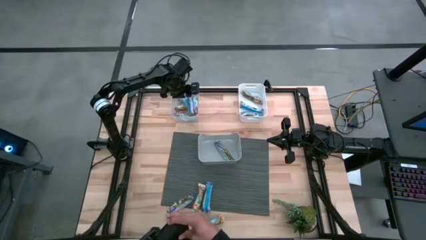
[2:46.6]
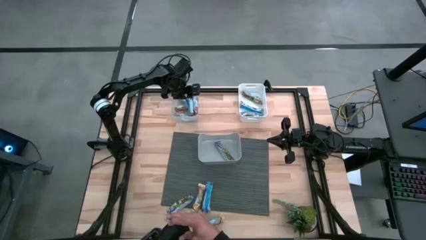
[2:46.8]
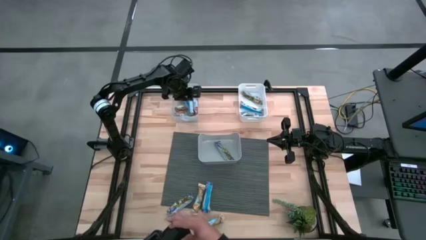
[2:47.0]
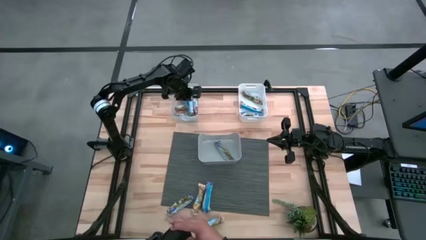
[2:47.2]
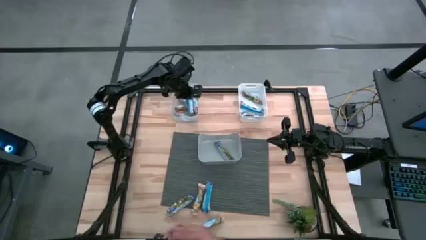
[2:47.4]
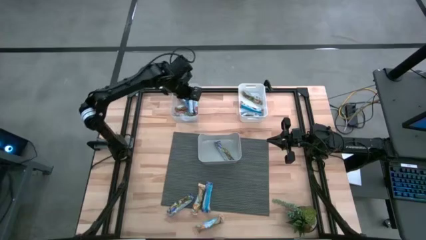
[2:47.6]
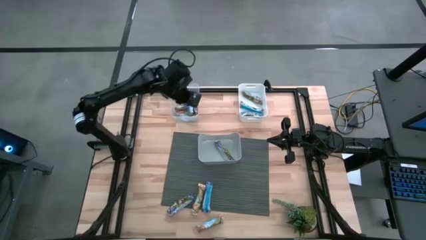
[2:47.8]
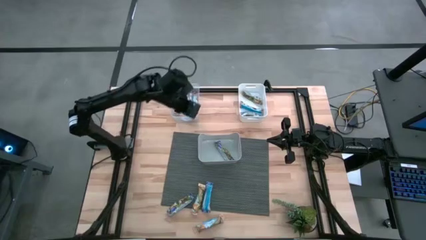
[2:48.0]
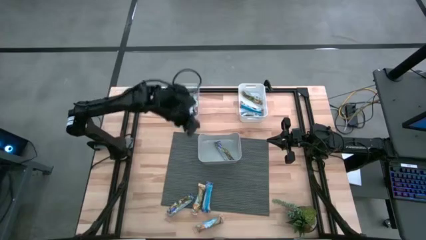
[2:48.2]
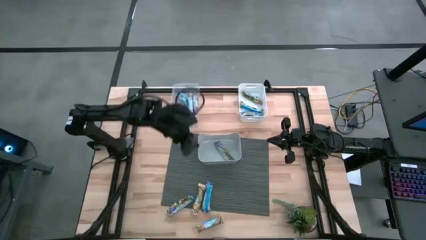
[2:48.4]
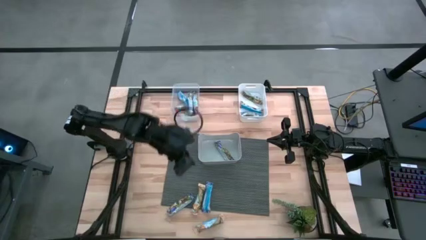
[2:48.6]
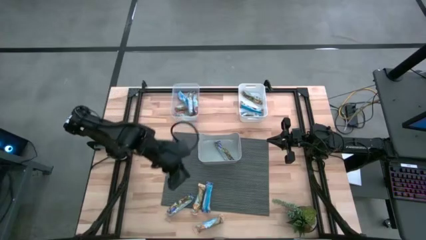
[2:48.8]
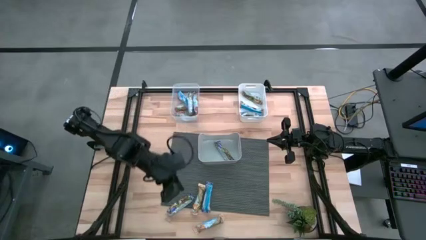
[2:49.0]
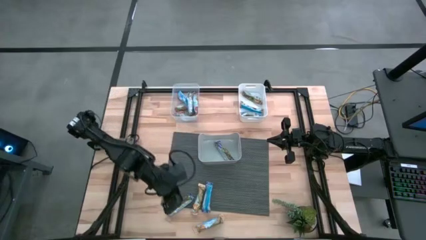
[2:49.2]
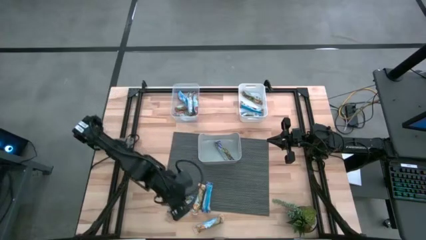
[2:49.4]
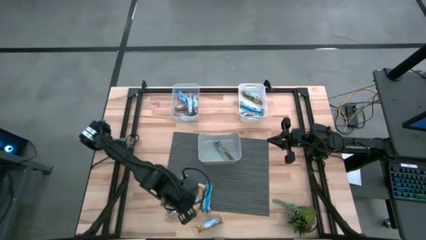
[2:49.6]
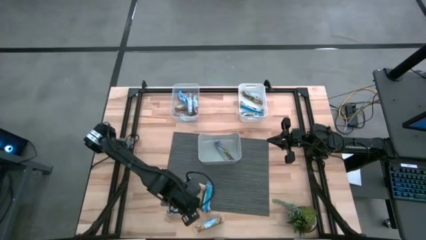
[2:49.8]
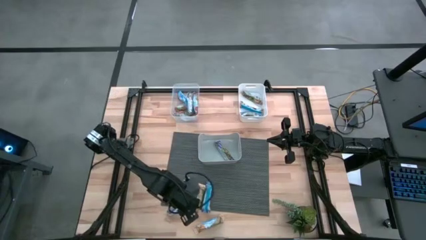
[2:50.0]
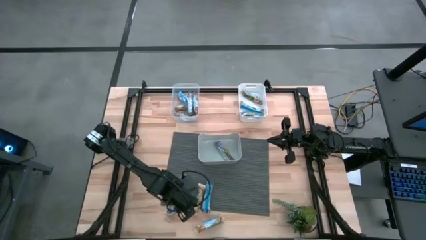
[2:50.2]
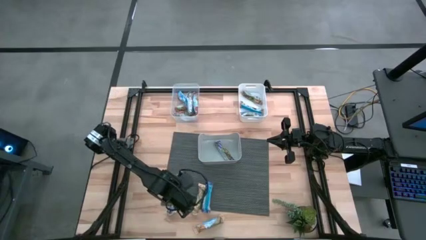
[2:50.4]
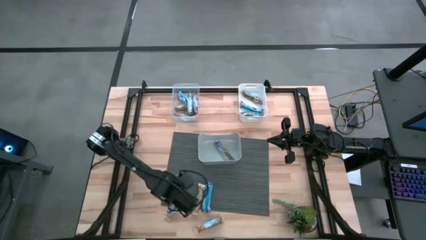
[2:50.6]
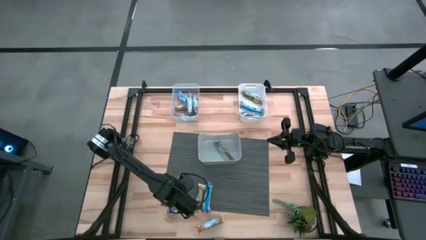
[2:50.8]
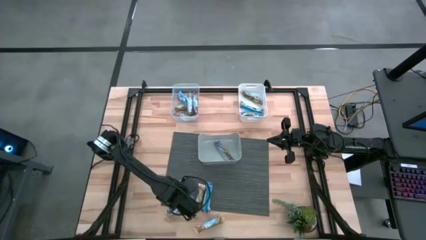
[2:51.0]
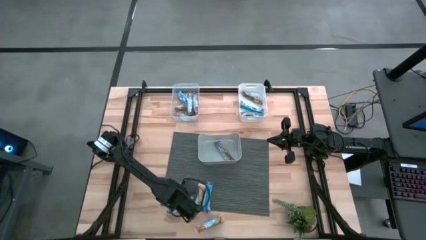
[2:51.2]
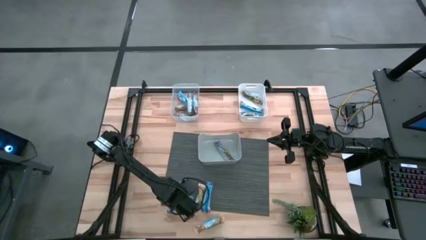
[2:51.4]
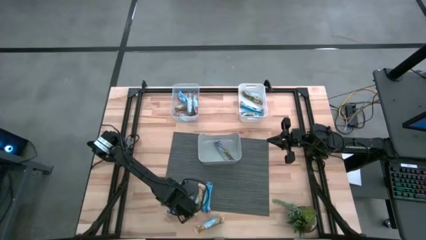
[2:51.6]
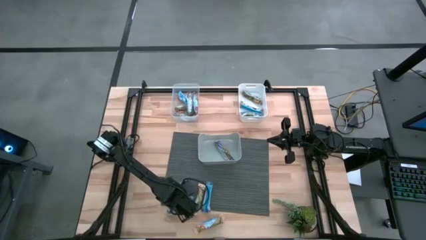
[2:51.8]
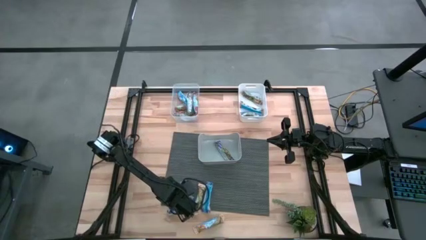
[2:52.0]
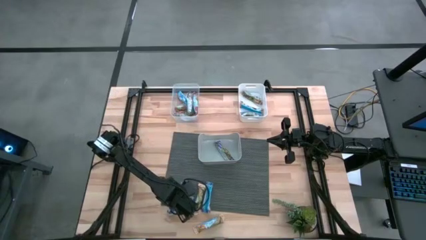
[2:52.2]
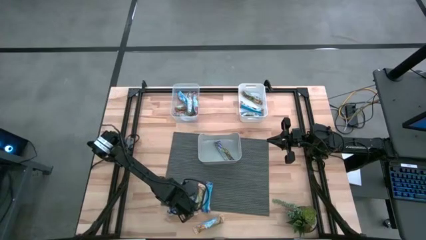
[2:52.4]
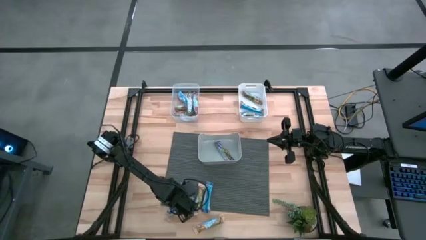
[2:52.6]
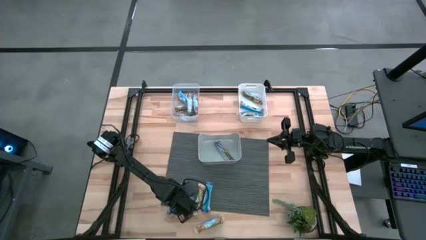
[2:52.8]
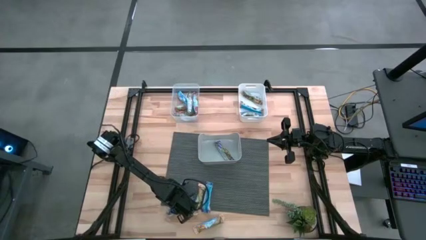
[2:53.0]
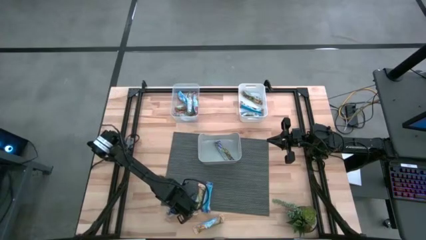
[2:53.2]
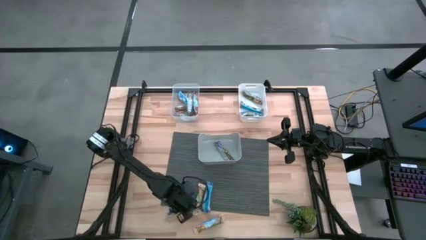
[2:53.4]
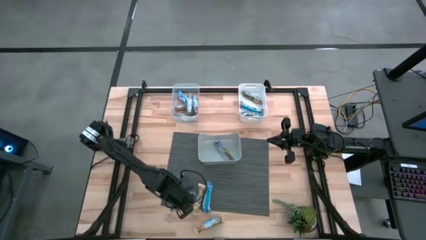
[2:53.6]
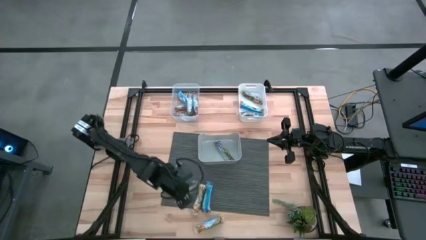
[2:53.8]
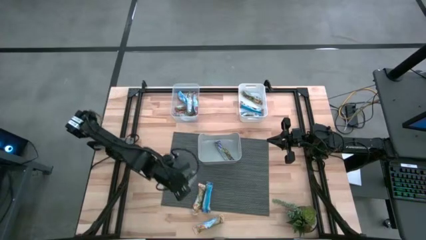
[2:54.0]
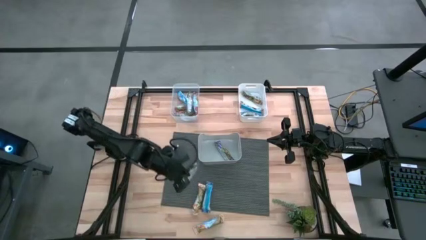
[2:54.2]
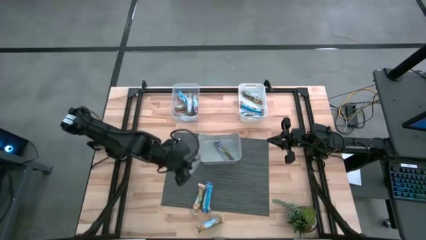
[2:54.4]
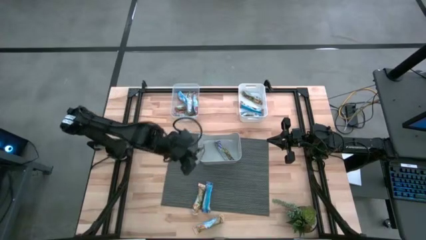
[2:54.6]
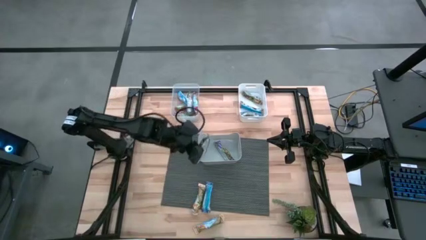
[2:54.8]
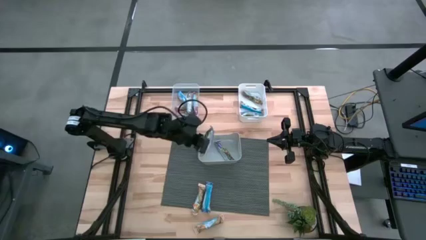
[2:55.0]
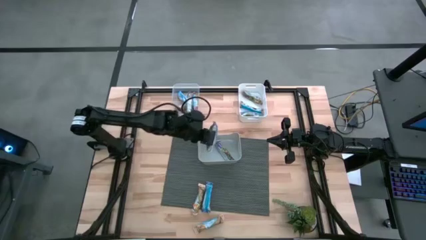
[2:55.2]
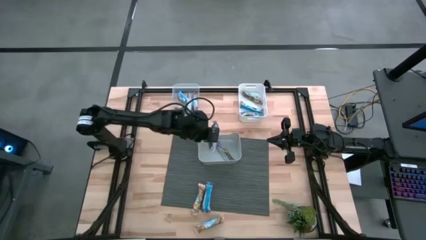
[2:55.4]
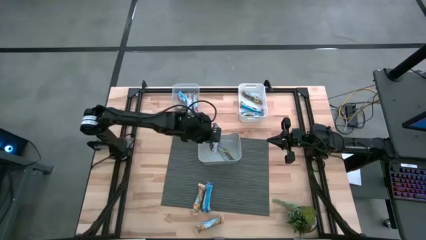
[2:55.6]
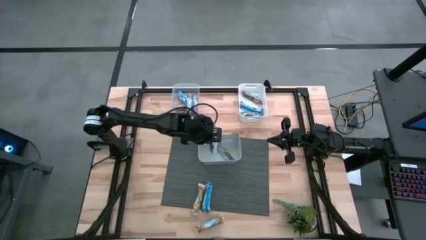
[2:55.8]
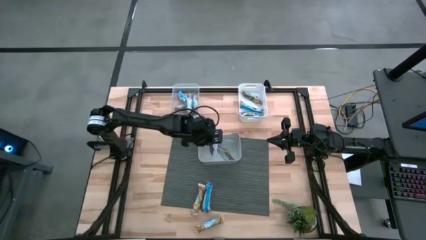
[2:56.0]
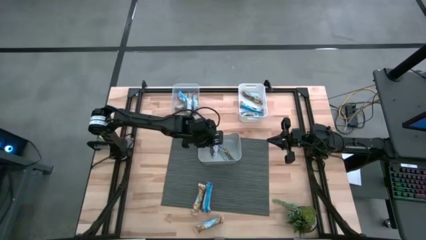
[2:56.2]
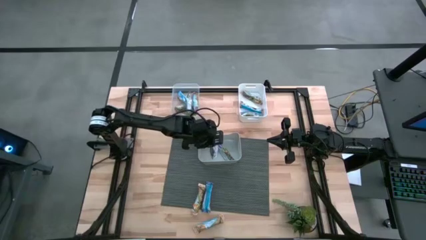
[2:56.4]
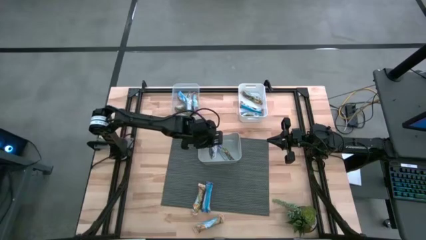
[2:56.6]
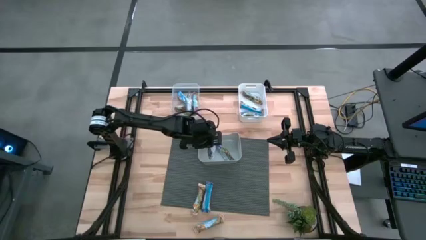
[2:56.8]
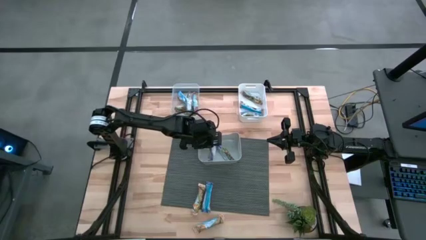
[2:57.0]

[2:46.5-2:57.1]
Task: Pick and place Granola Bars by type
Put the blue granola bar into the gray bin

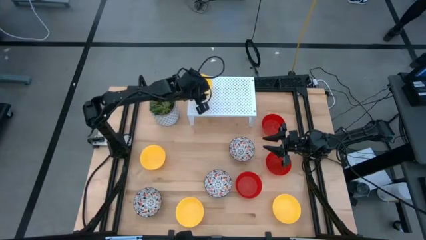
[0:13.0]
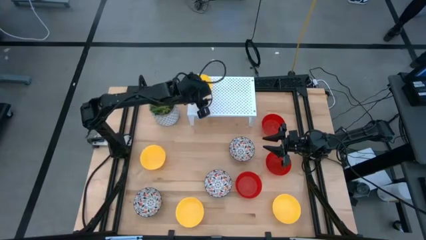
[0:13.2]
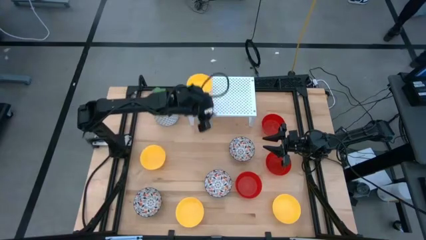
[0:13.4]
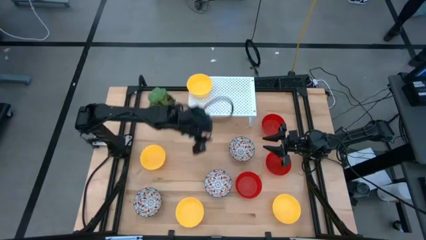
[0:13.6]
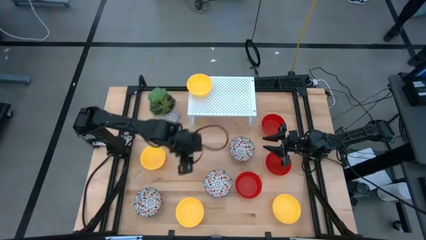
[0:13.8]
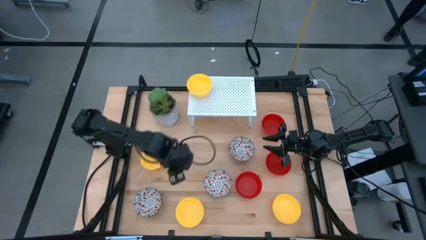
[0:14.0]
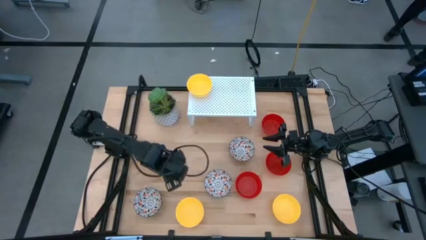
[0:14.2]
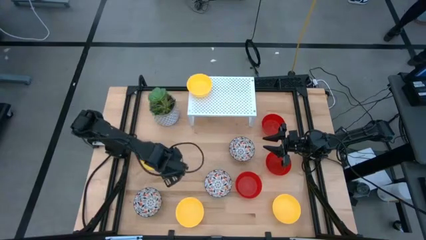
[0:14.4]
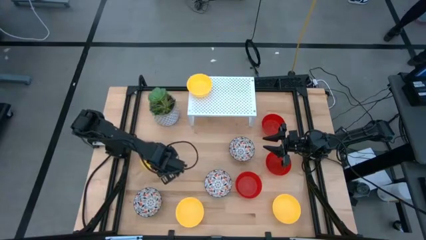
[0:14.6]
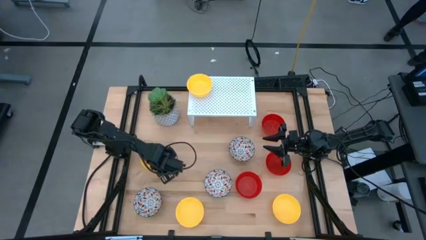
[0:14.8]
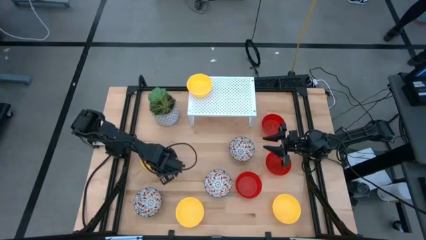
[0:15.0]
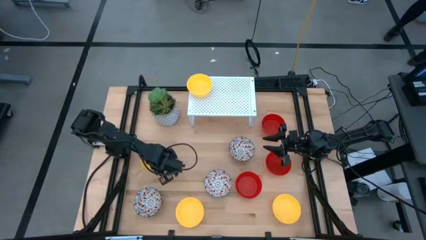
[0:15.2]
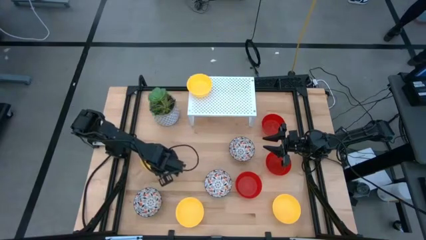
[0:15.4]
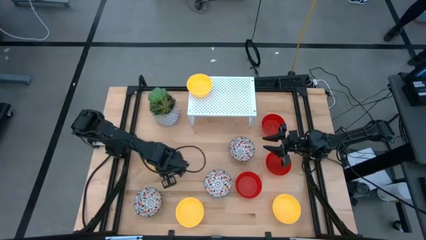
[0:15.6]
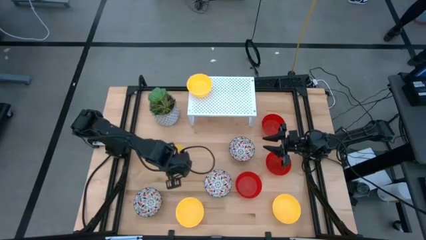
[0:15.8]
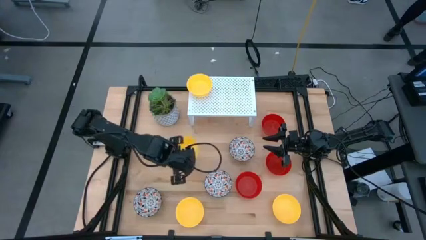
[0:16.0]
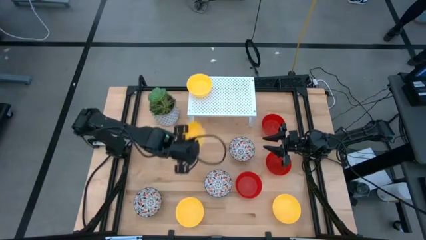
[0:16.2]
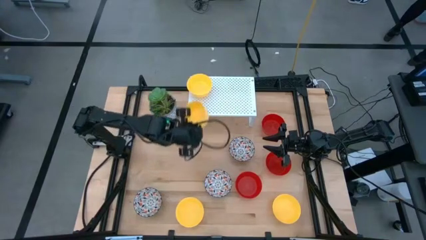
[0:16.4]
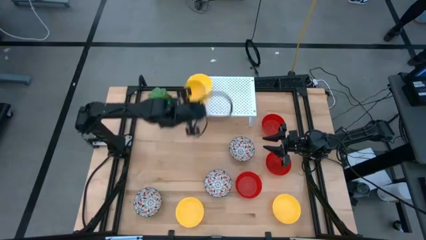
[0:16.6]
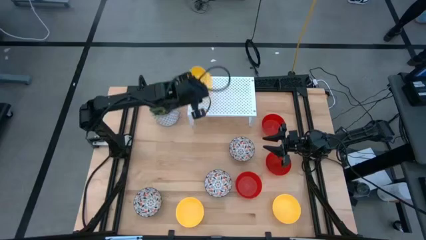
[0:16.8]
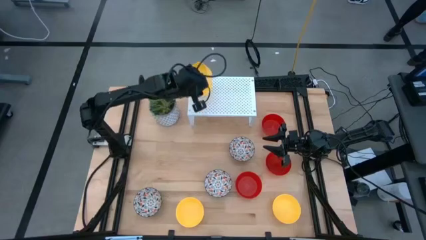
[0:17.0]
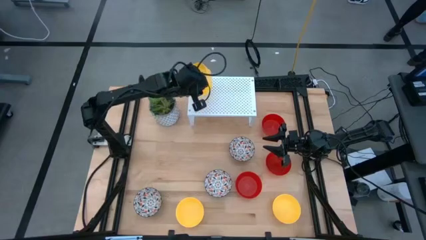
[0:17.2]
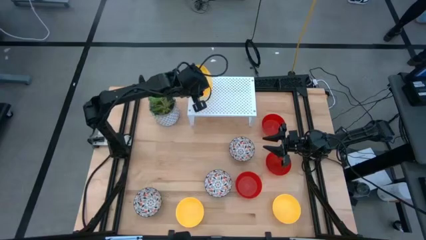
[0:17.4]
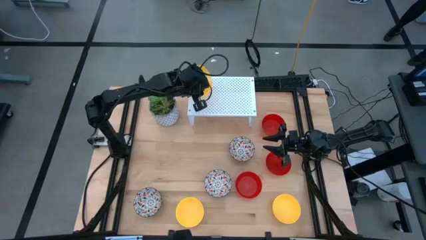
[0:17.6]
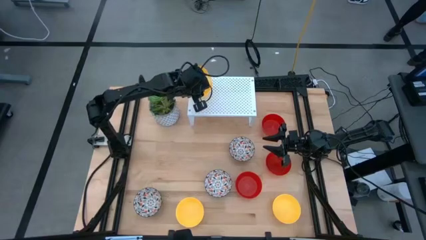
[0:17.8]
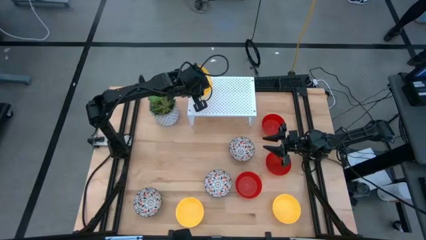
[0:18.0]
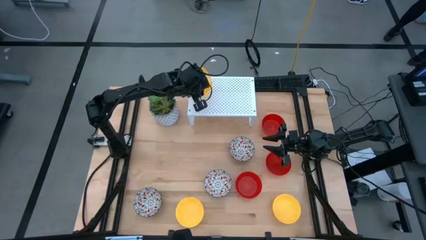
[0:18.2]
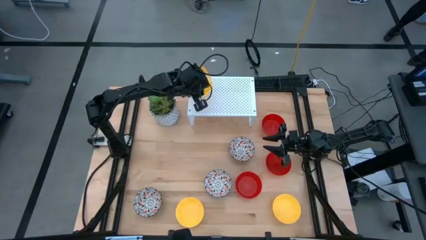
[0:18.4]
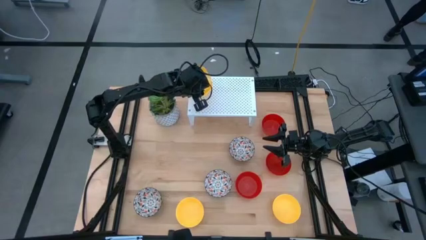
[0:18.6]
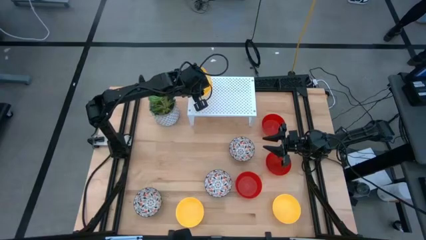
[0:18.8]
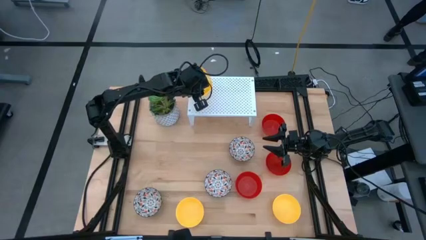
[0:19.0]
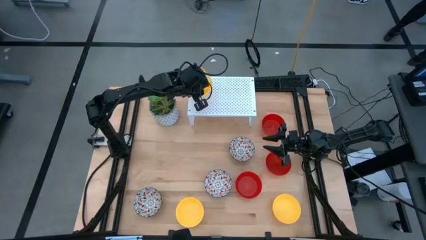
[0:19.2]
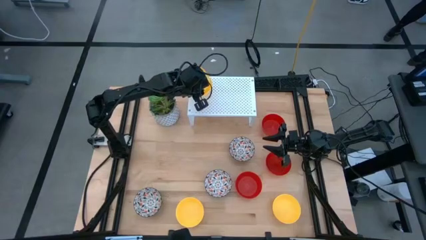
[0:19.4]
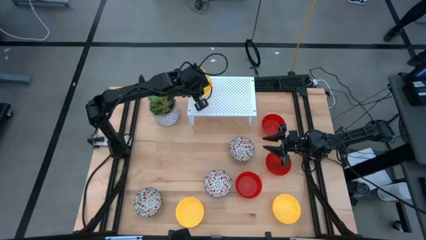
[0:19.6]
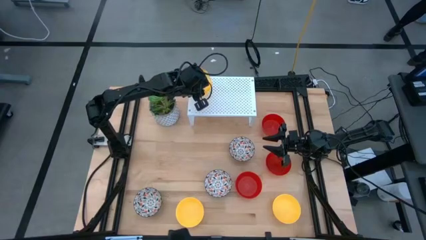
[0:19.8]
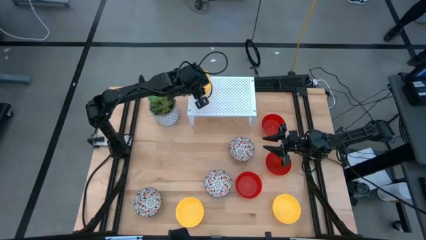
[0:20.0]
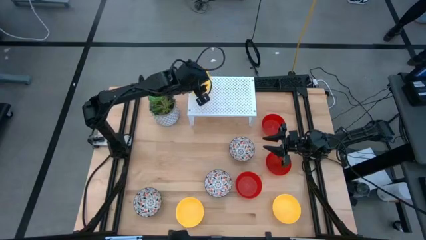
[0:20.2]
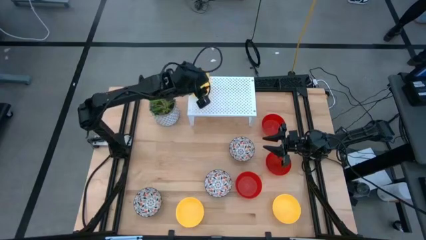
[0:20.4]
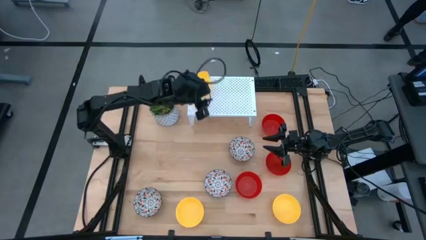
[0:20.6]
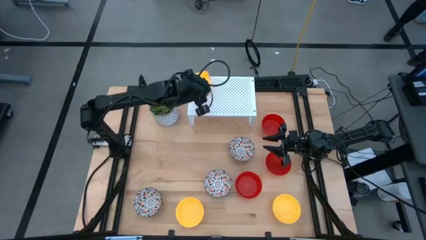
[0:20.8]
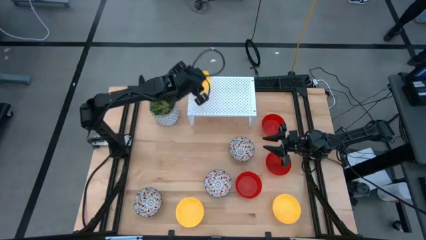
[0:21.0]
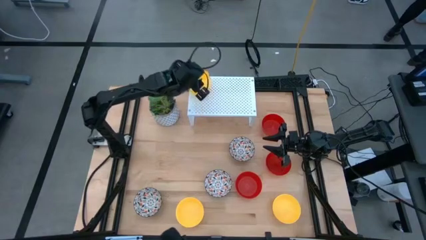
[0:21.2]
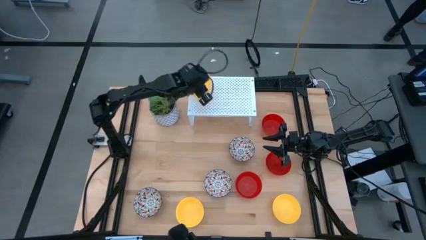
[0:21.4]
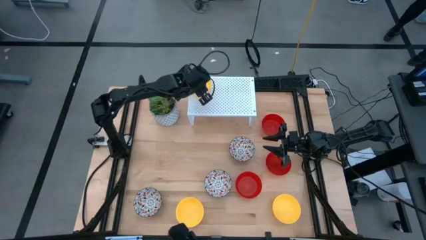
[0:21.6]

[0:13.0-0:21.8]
Task: Pick & Place Mini bowls
Stack the yellow bowl on top of the yellow bowl on the shelf
